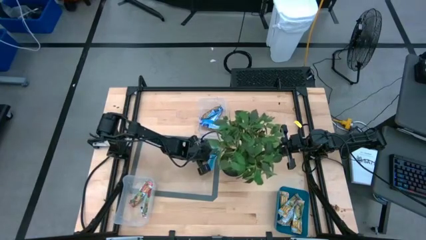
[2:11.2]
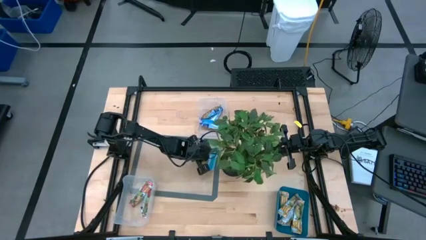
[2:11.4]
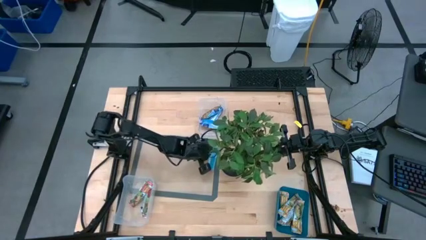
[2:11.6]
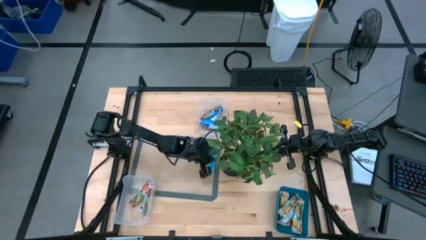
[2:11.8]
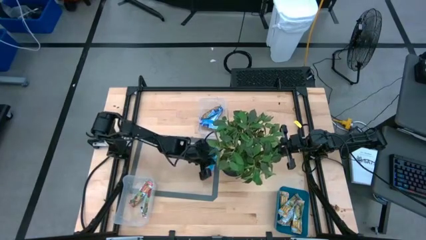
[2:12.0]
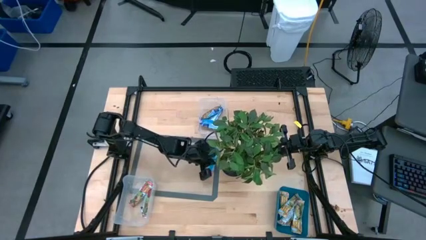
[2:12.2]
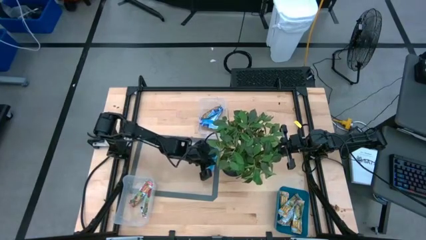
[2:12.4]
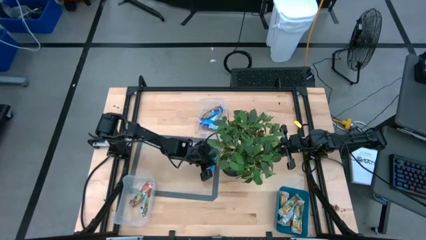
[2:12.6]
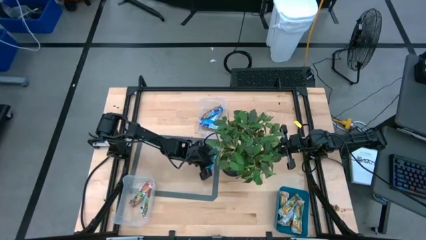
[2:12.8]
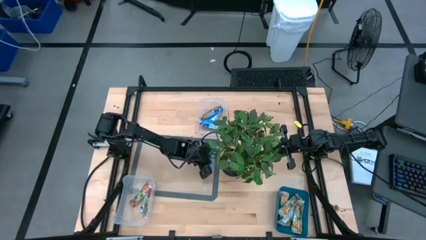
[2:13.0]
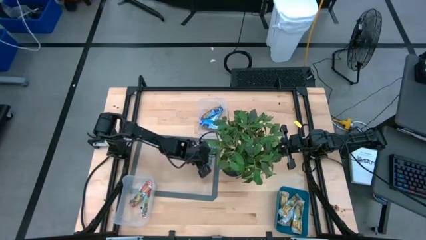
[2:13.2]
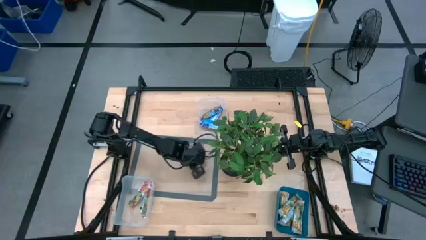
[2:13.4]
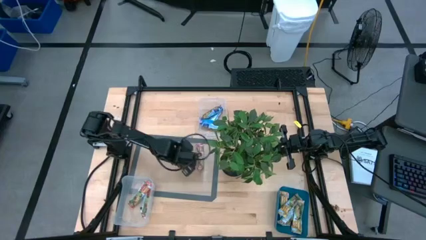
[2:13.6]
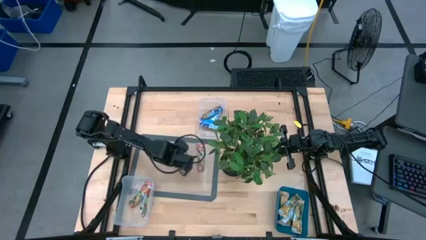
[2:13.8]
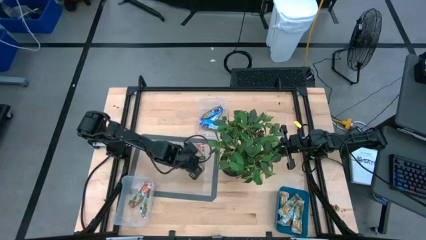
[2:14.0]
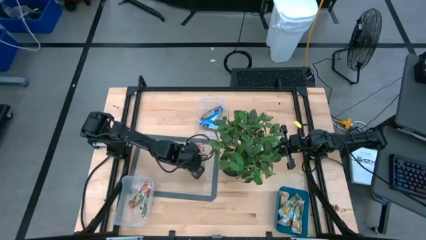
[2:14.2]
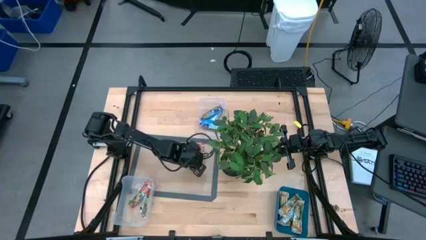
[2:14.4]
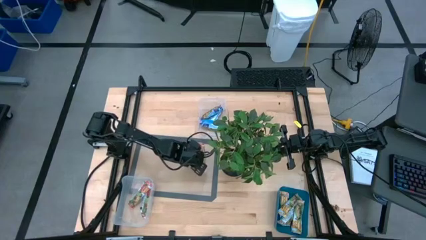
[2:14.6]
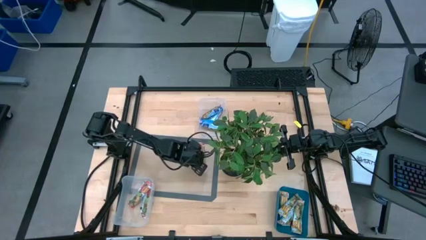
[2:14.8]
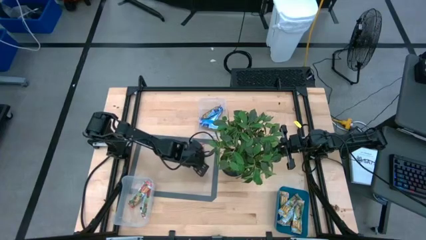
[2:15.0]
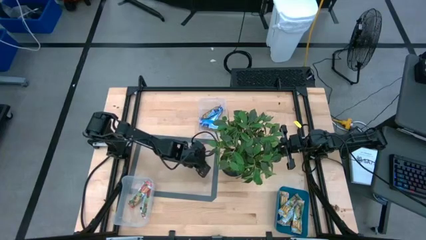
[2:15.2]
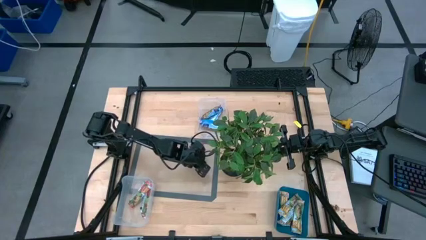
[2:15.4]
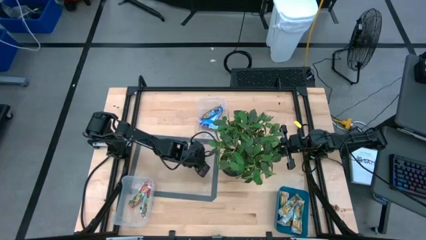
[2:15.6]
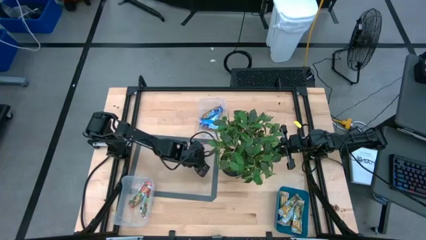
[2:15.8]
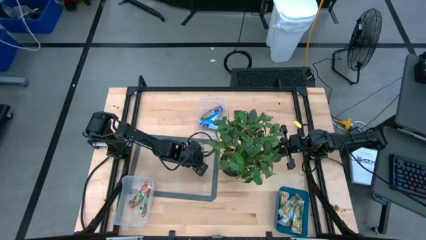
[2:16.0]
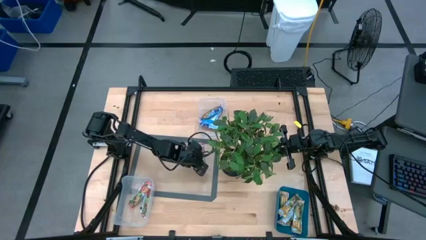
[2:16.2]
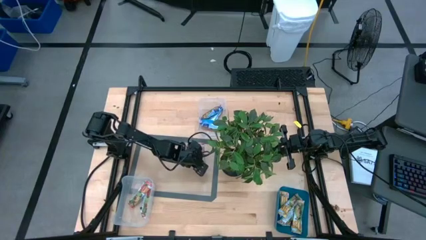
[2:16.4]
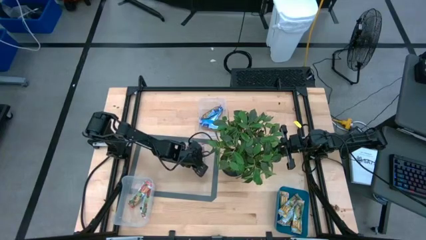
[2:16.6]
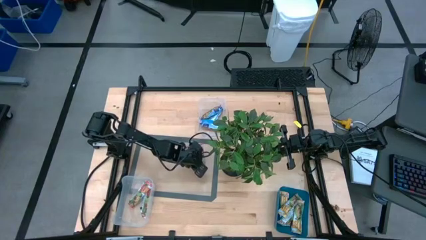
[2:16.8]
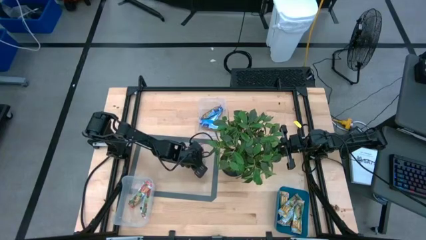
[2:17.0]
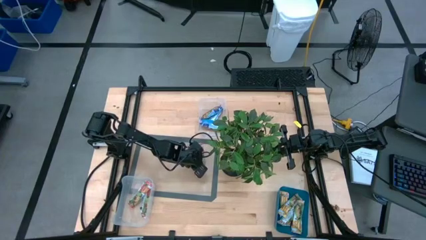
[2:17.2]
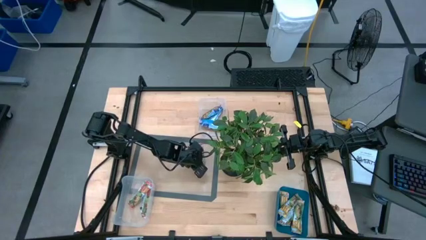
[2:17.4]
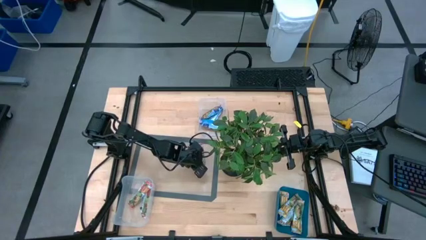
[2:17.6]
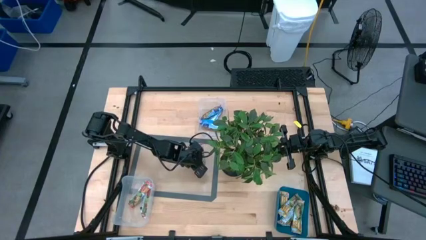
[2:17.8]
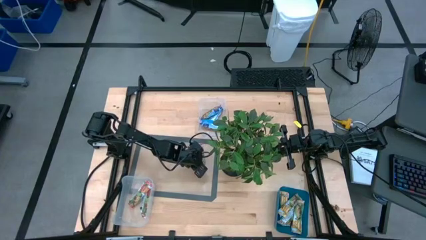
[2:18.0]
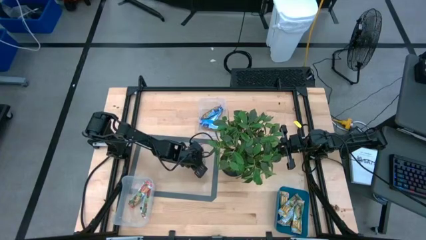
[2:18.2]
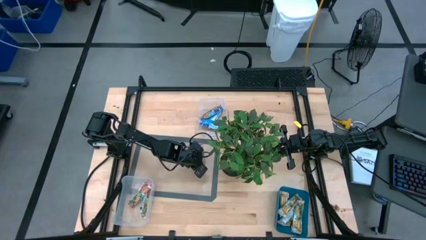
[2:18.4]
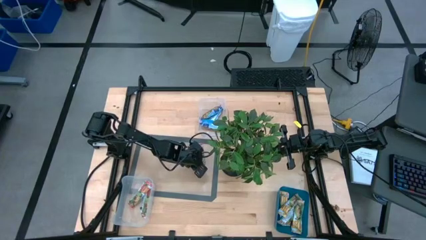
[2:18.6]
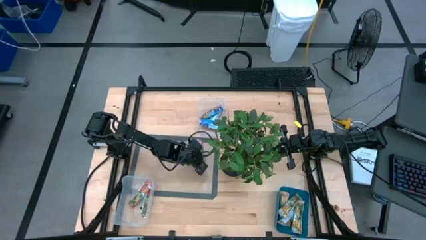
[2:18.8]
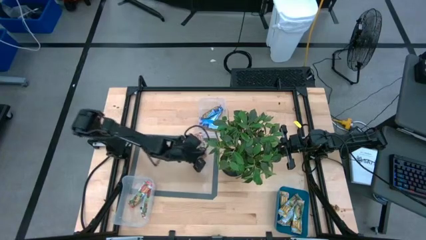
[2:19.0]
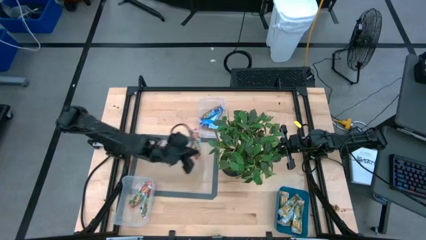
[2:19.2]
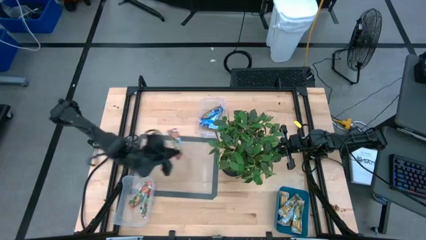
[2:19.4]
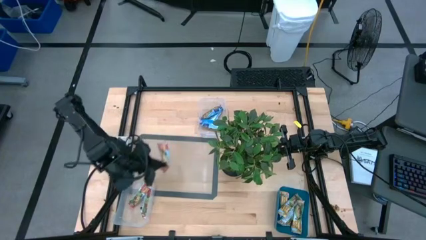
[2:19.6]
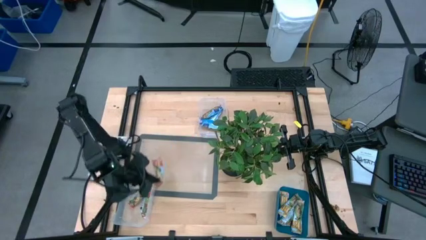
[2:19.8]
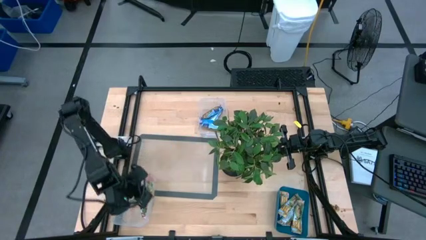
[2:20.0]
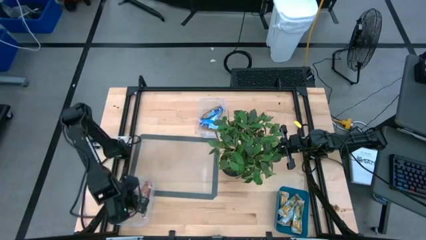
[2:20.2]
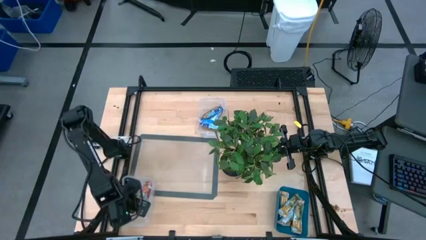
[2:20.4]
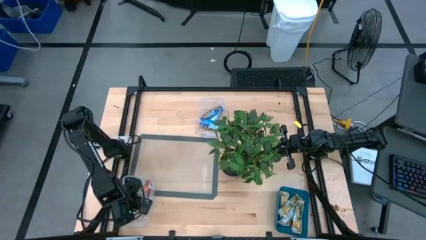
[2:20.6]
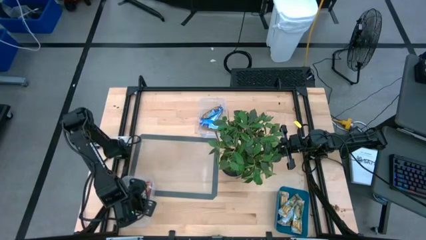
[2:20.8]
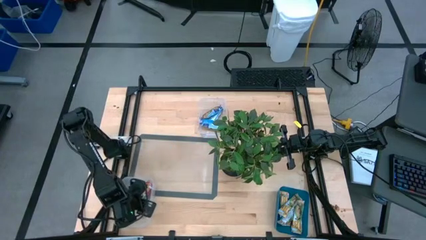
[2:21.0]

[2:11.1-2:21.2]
Task: Pick and place Granola Bars by type
Put the red granola bar into the bottom transparent bin

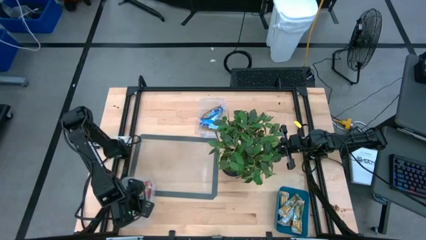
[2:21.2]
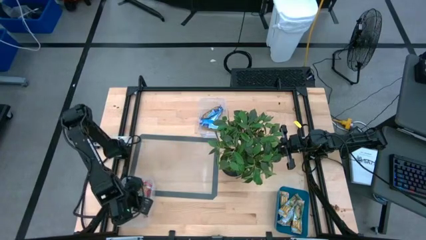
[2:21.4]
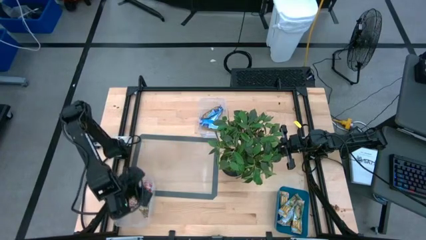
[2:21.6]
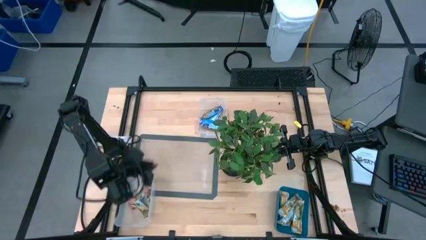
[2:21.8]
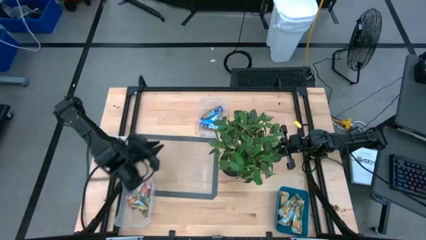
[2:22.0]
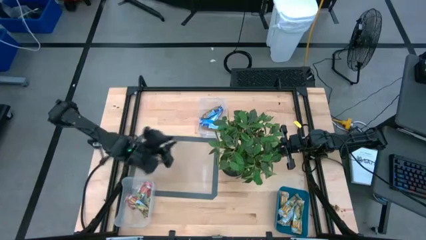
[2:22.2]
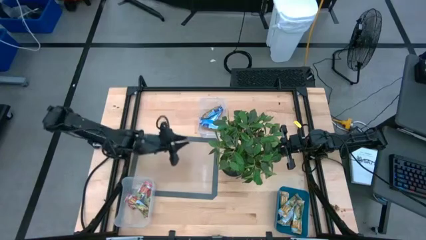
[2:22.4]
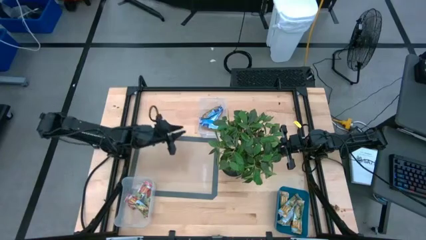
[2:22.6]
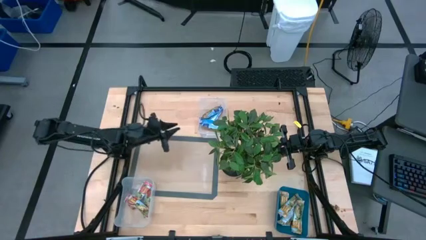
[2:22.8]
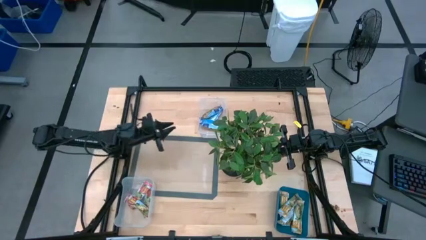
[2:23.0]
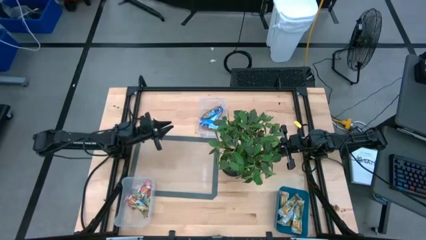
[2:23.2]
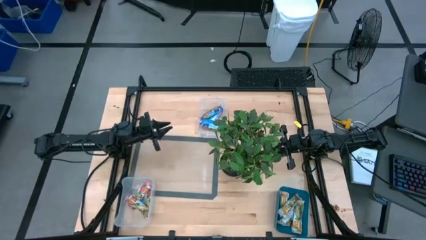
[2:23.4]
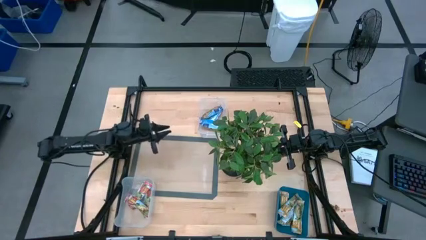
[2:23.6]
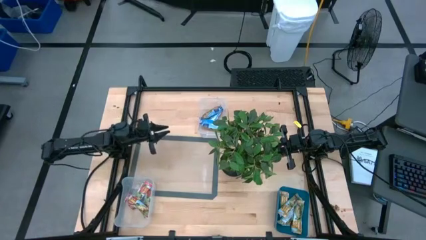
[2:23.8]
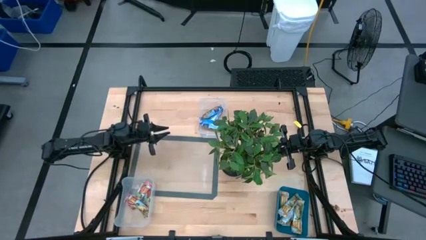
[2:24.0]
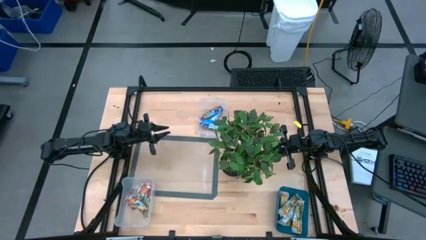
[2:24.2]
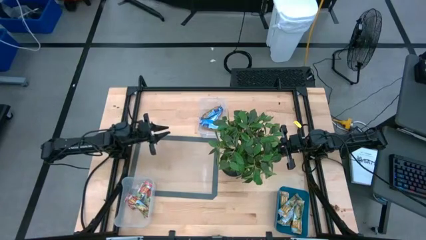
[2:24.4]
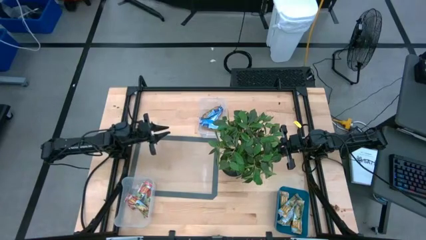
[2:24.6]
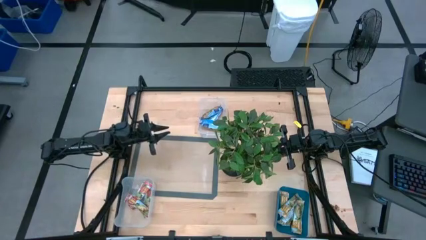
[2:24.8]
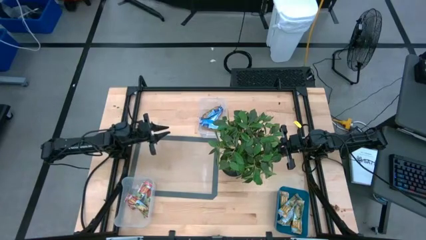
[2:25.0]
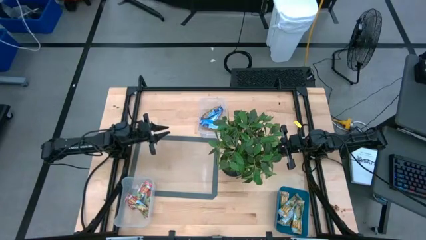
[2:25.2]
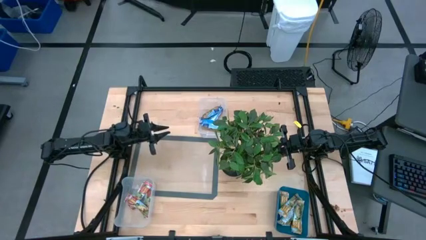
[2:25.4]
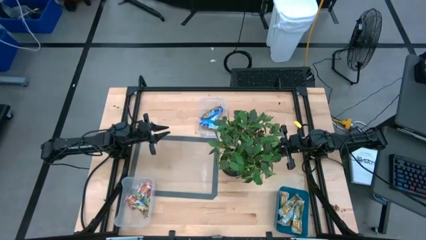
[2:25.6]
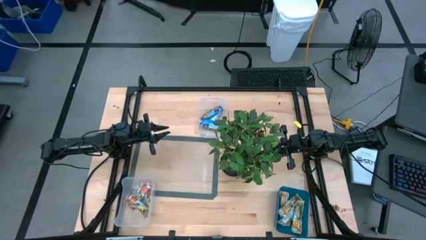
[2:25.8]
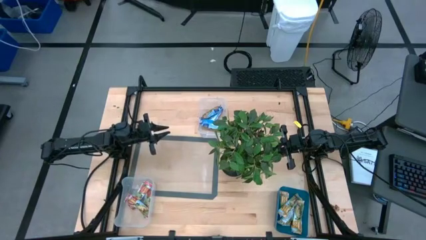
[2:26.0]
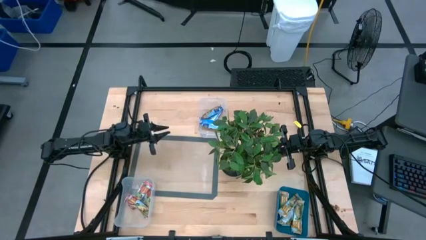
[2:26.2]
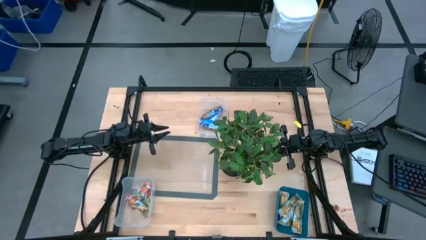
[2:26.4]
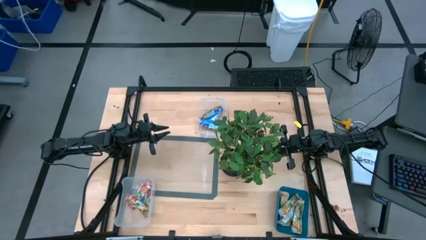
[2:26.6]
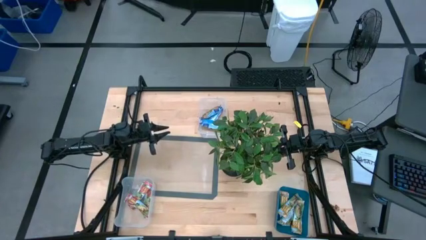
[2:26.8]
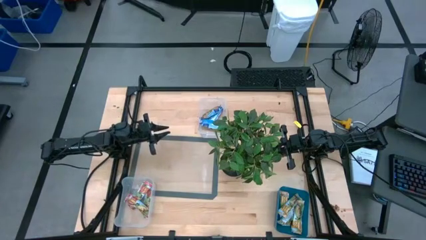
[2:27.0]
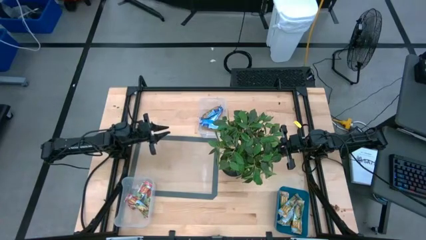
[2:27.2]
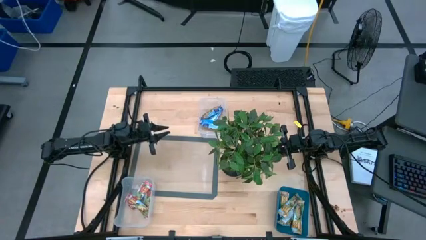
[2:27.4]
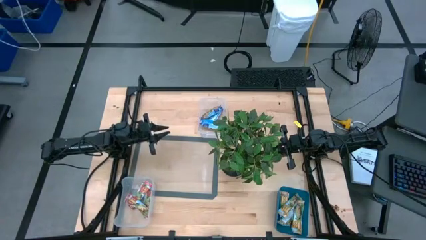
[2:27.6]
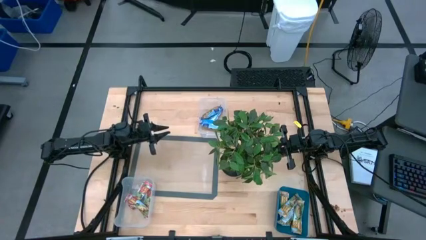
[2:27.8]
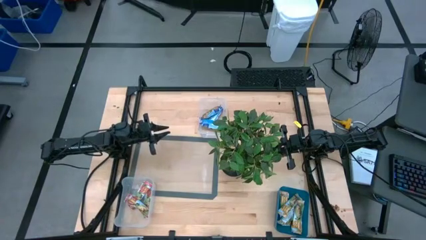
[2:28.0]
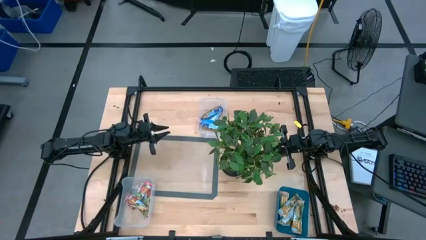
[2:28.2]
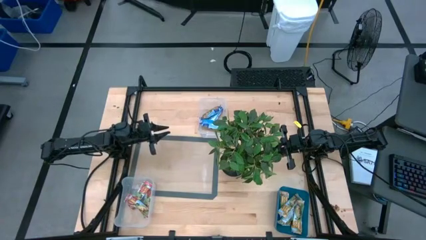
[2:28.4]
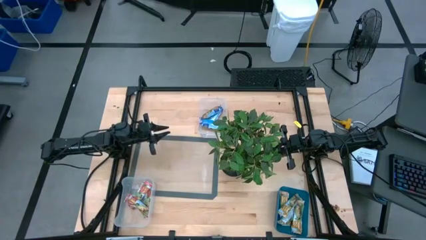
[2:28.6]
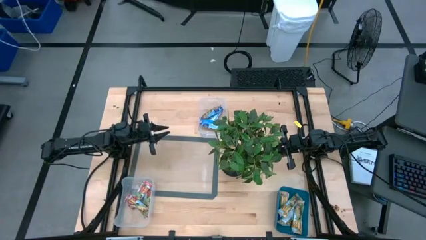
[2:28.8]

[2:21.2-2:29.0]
Return to Home Position
